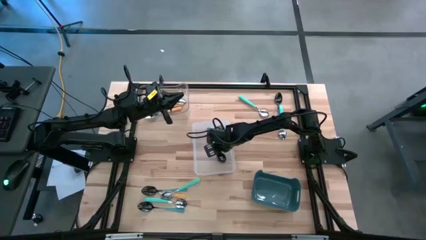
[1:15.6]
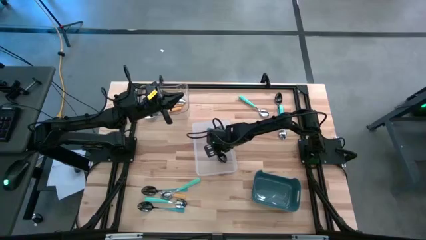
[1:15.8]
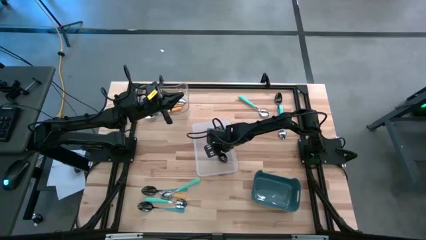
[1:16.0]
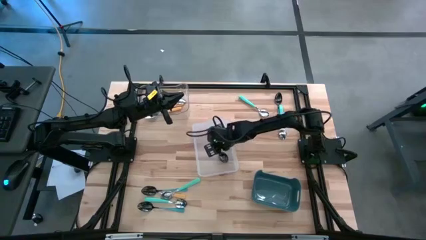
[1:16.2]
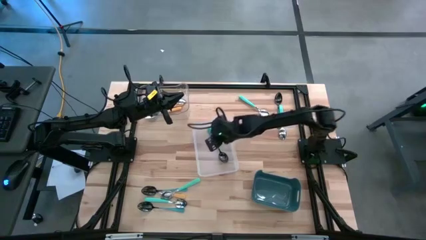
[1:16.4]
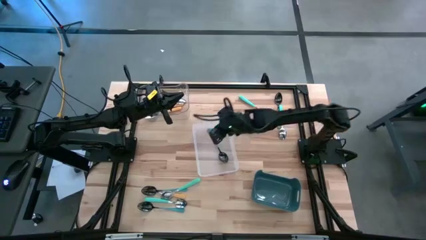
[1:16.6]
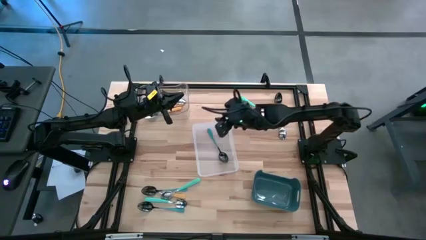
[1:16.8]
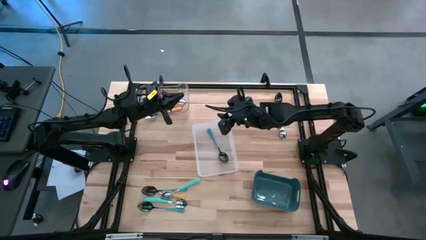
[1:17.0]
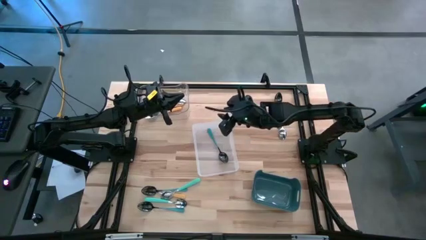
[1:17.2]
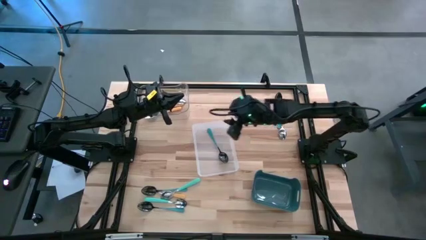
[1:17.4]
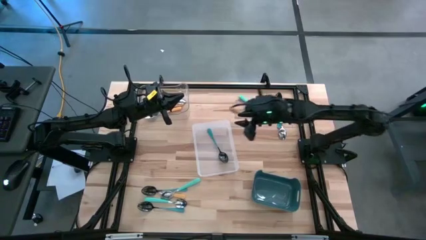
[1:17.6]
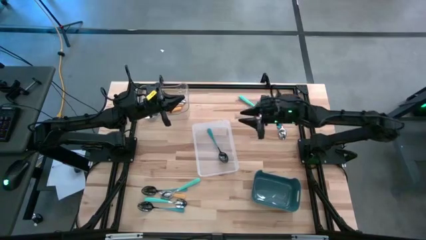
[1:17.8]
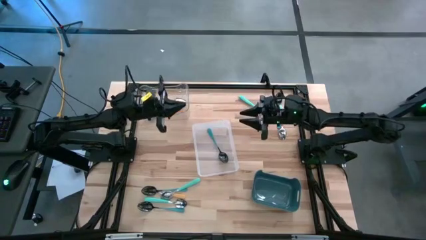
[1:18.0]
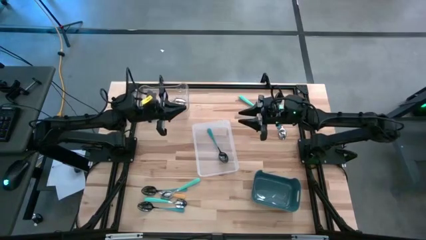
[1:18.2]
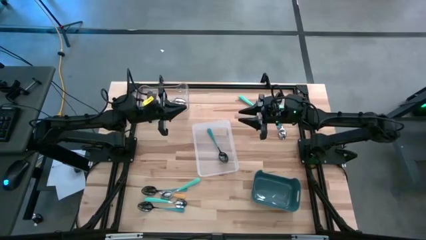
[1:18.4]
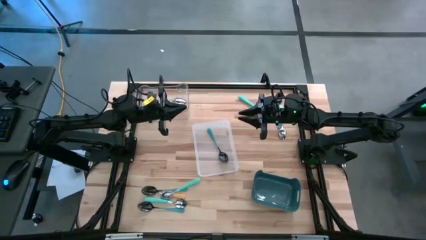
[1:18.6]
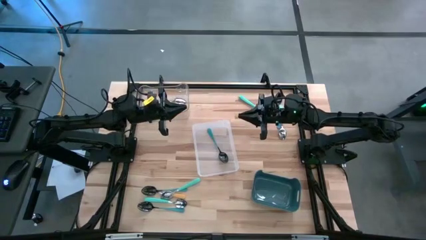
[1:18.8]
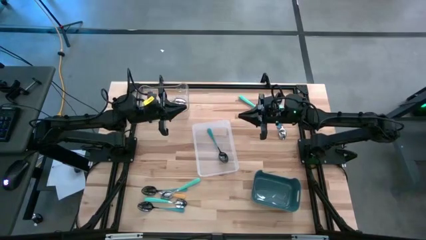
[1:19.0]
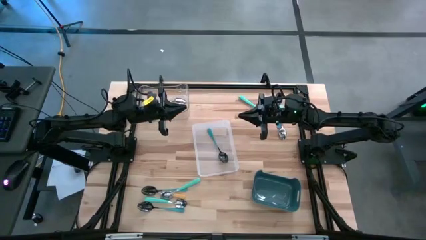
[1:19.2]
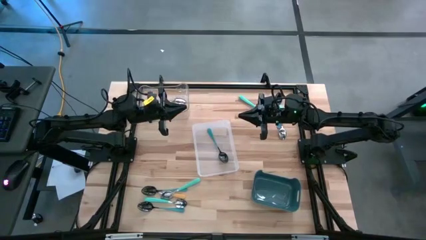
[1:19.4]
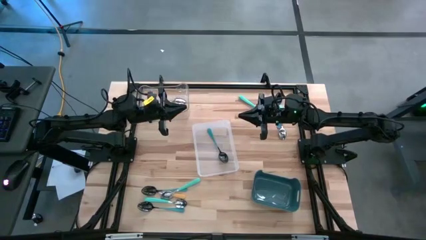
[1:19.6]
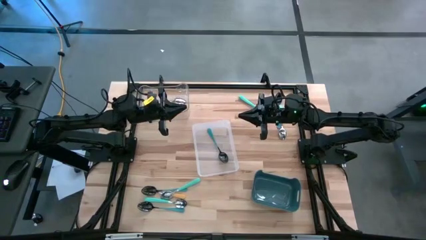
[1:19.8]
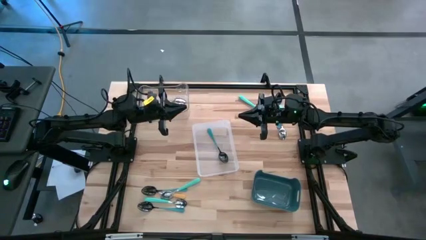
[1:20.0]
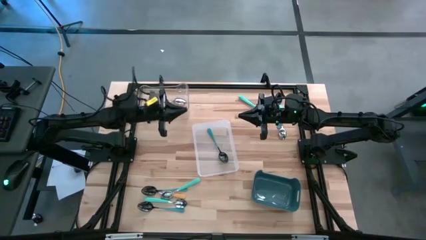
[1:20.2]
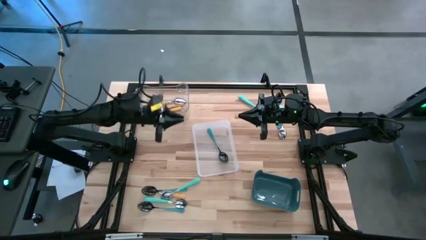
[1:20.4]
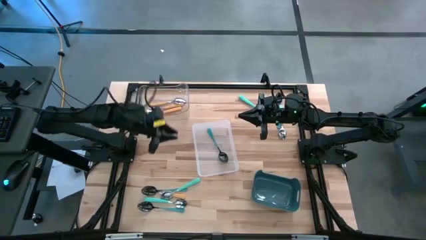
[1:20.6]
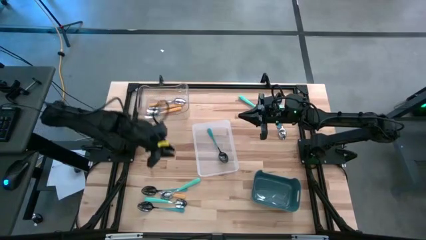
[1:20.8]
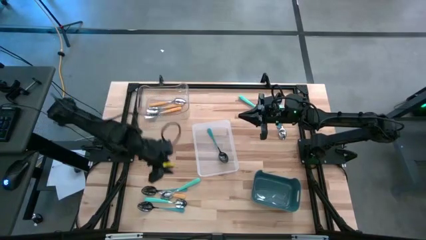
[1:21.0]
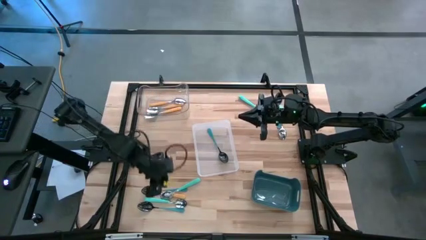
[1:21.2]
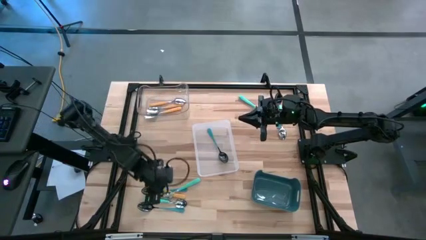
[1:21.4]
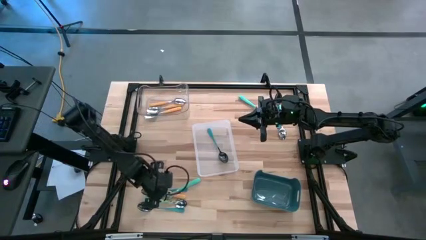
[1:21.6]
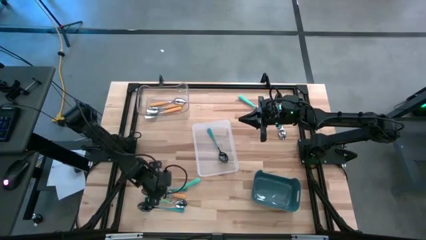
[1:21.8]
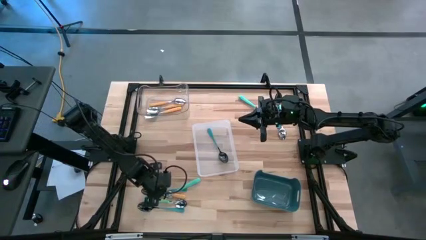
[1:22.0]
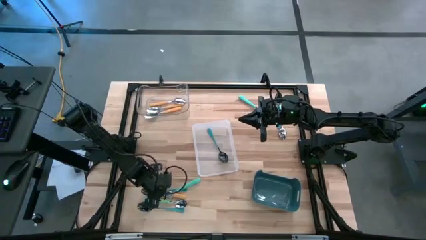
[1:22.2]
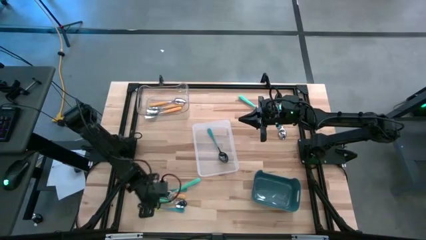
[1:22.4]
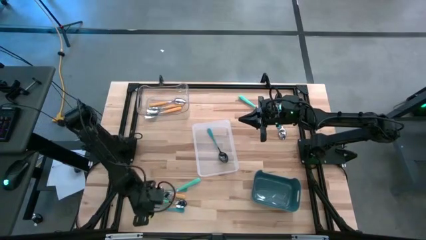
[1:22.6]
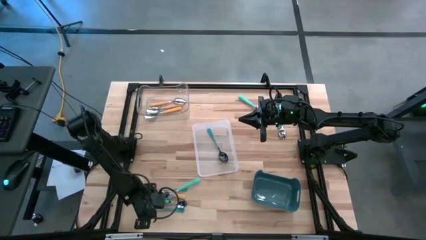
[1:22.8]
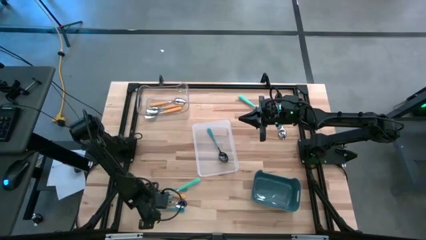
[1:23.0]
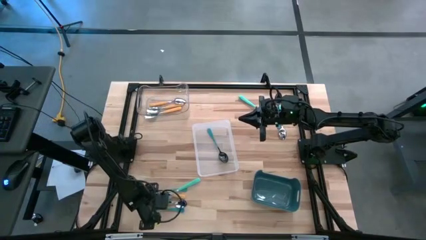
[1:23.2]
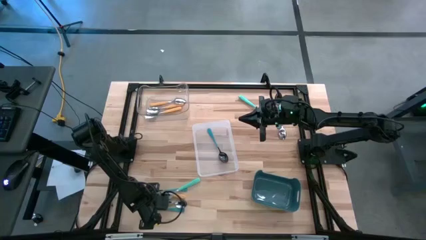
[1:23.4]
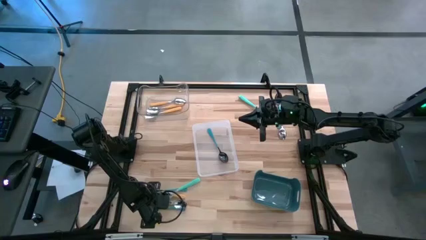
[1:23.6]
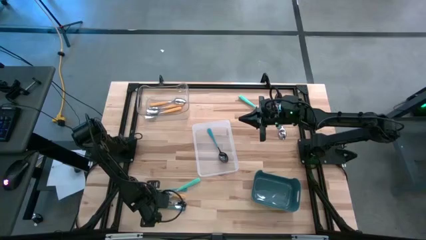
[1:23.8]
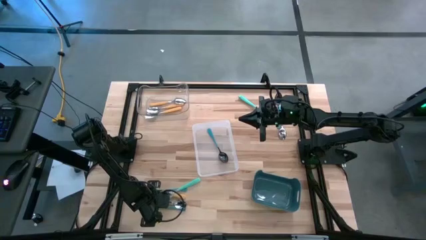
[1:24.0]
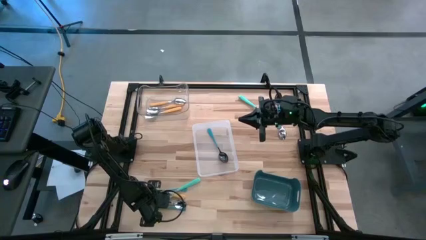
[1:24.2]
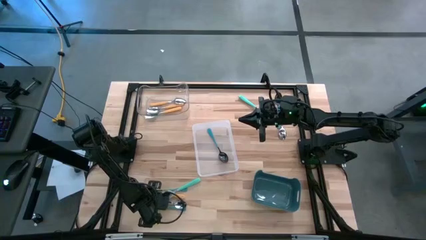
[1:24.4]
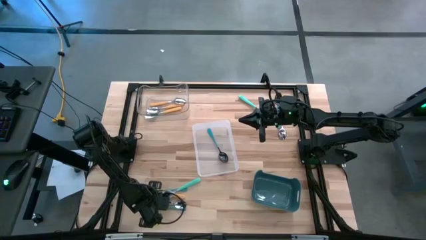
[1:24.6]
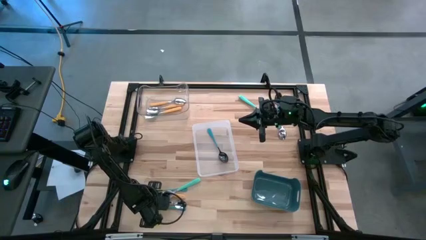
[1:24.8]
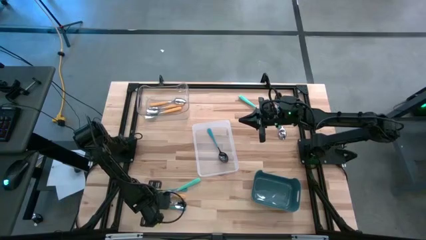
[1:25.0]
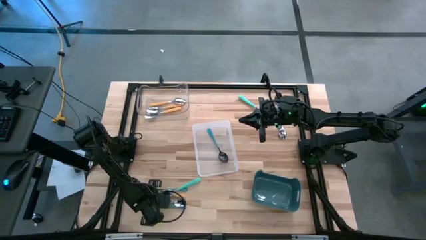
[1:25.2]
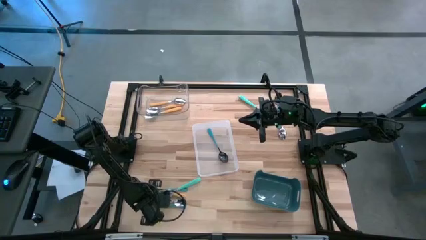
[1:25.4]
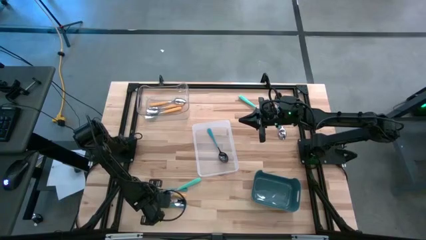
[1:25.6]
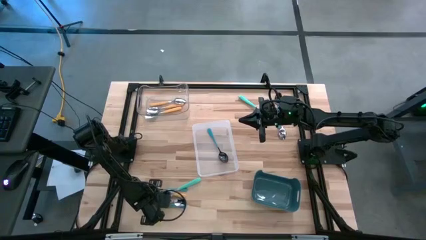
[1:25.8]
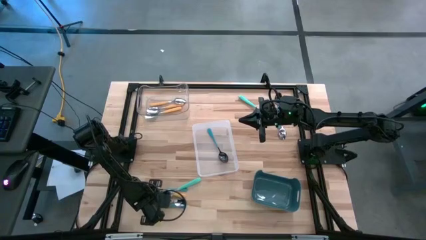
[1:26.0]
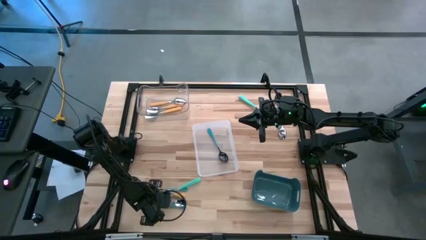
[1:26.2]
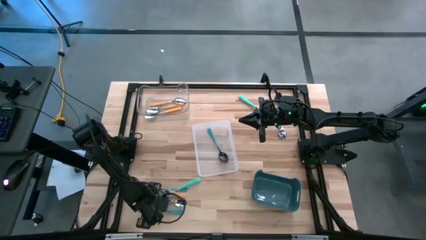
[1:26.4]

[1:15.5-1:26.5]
Task: Sort silverware by color (type)
Put the blue spoon into the white transparent bin
